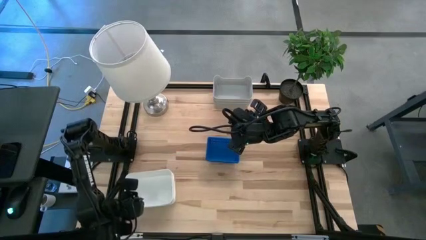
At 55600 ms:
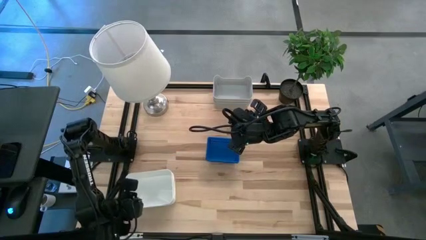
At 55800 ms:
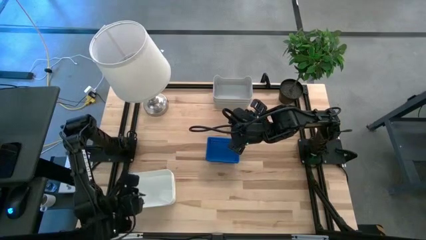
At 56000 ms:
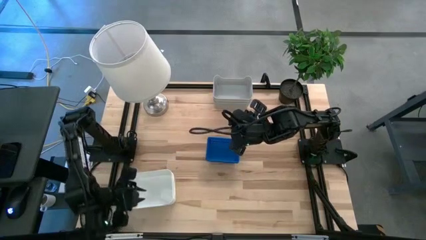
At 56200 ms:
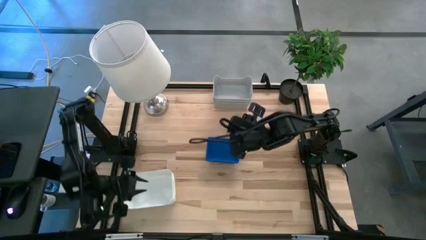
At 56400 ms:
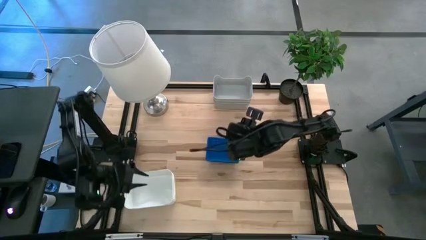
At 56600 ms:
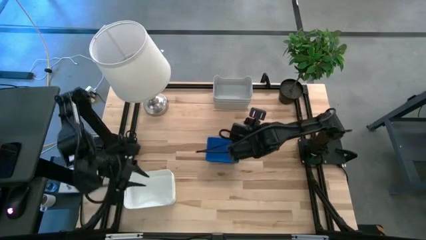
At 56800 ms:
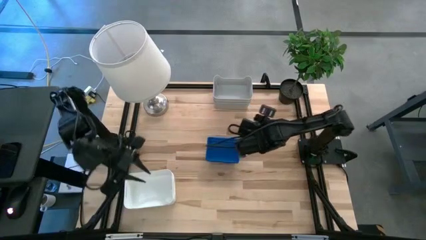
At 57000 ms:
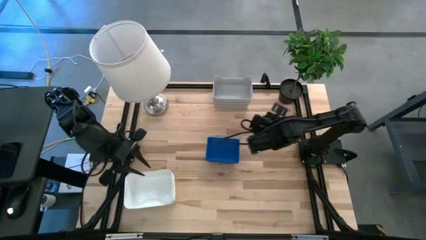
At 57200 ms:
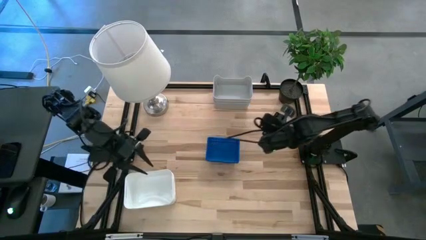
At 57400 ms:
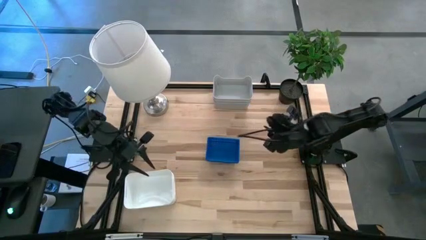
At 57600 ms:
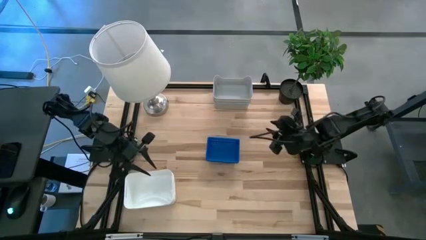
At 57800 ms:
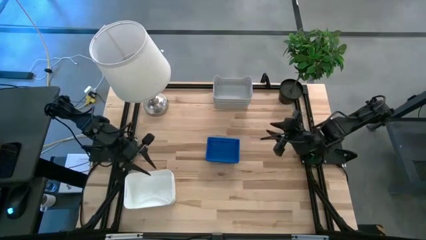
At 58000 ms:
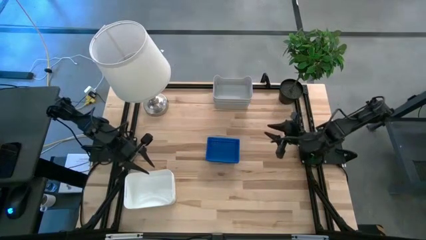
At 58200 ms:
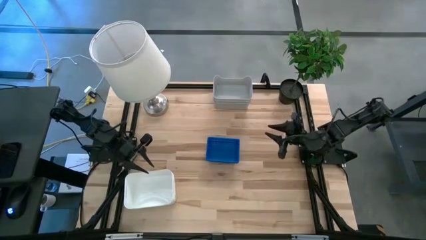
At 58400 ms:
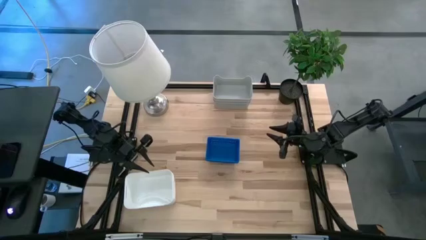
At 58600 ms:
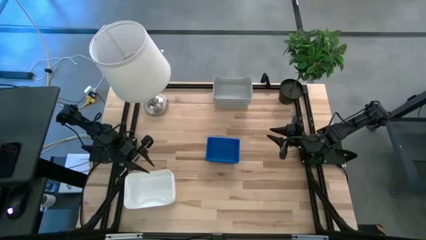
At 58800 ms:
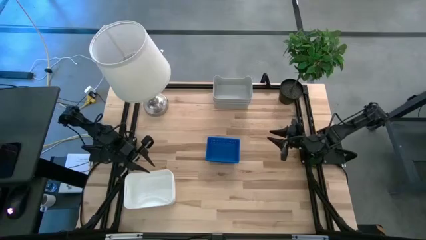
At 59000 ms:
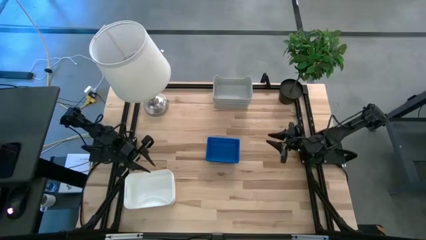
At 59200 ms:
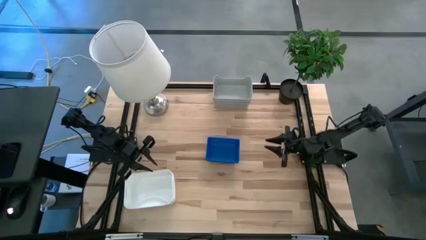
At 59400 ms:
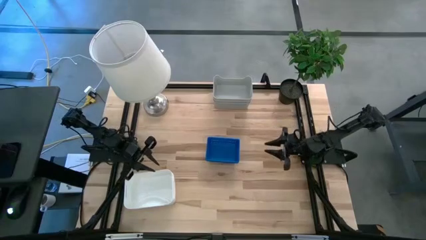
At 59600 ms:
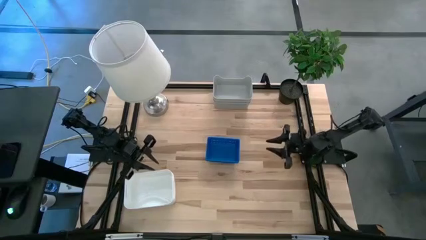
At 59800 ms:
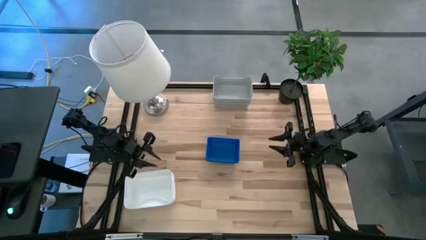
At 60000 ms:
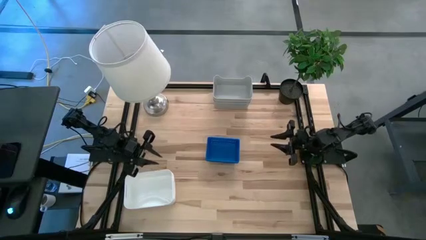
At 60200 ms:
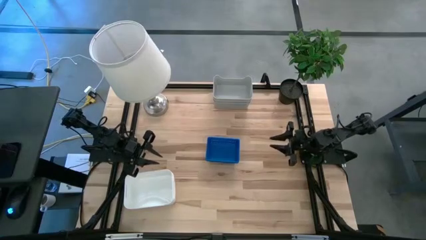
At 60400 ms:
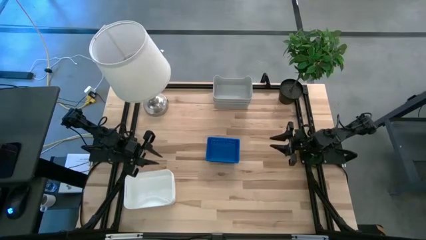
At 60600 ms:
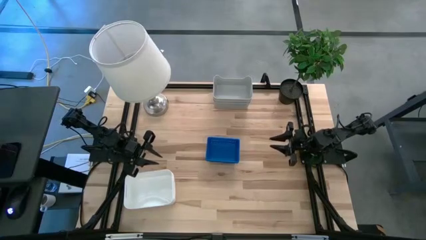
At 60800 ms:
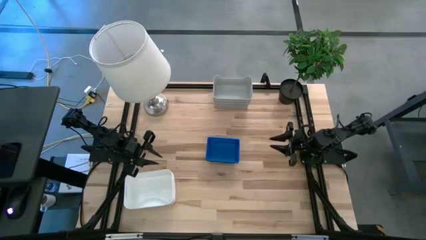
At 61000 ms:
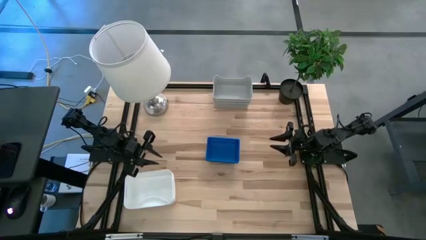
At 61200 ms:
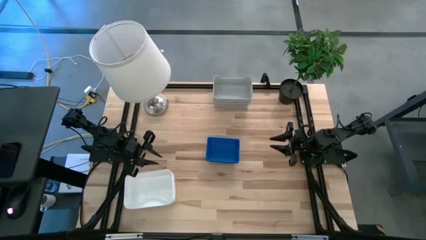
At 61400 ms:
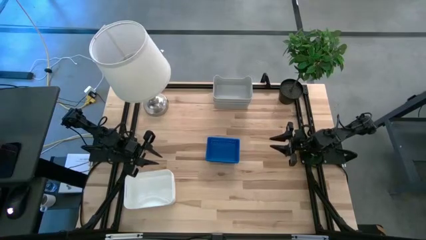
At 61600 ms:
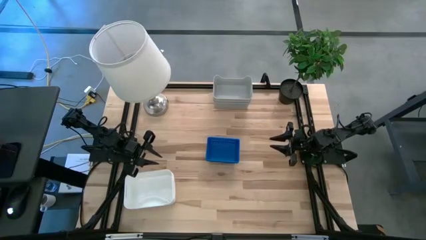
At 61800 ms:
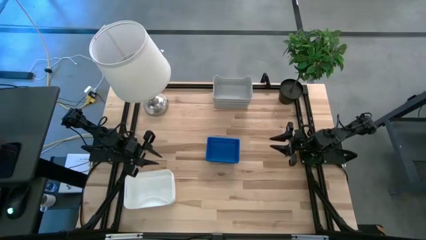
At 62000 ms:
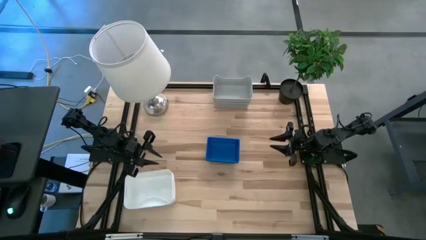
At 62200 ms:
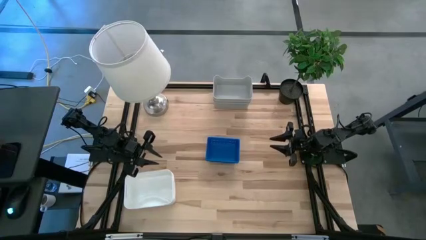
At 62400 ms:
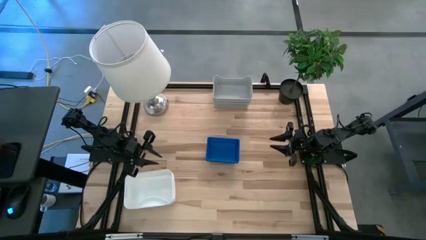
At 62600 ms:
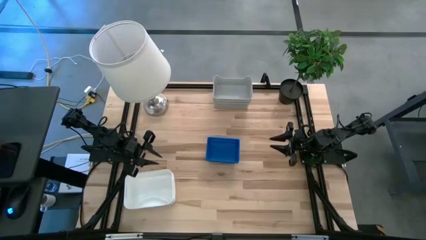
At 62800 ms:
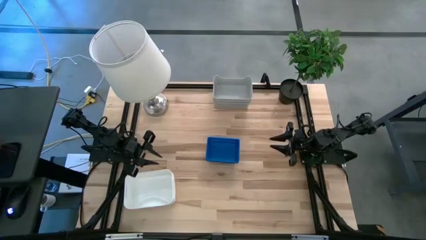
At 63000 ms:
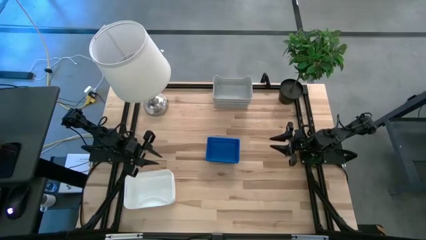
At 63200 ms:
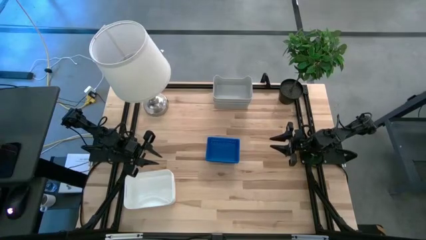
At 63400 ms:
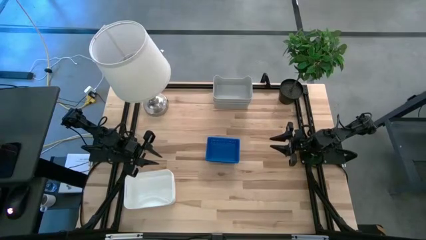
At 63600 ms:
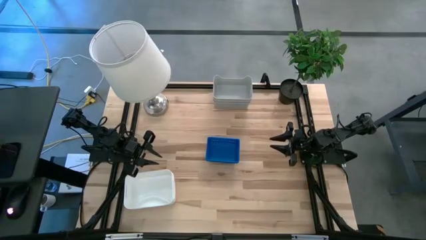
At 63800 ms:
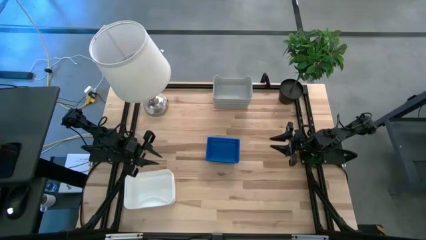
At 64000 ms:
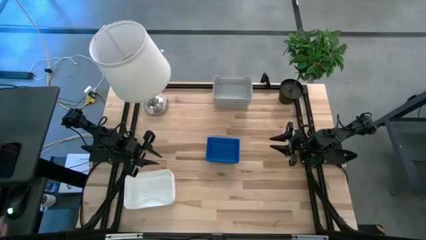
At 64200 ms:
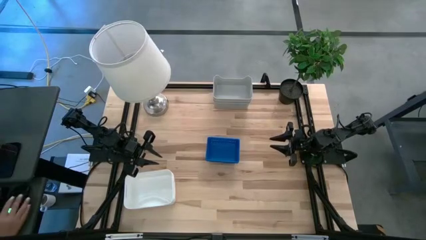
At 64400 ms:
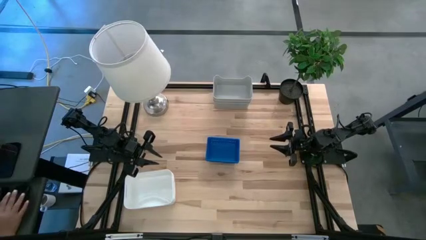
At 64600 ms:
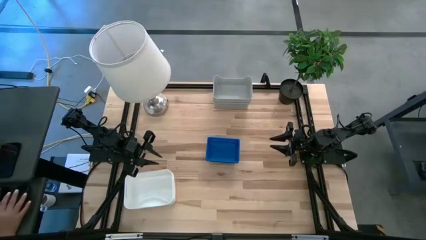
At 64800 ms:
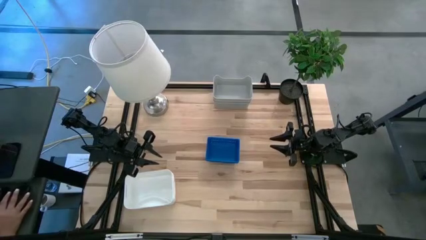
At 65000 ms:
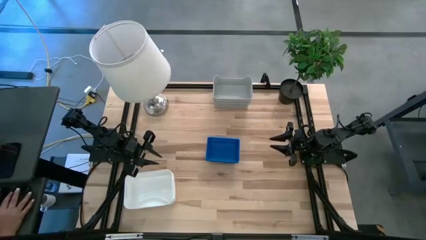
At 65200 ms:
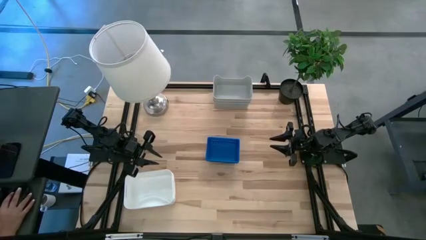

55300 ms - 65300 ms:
Return to Home Position
